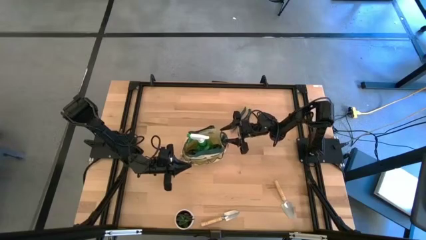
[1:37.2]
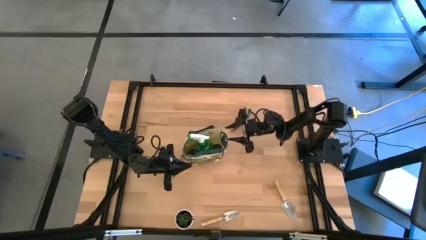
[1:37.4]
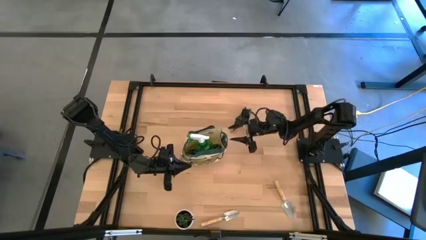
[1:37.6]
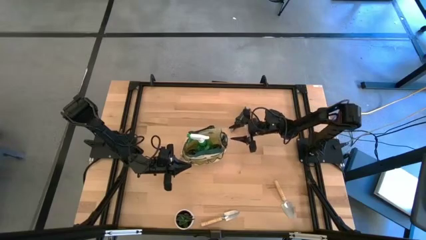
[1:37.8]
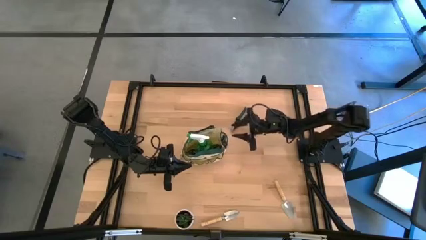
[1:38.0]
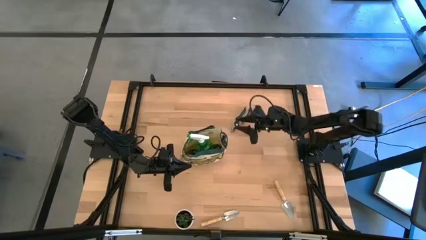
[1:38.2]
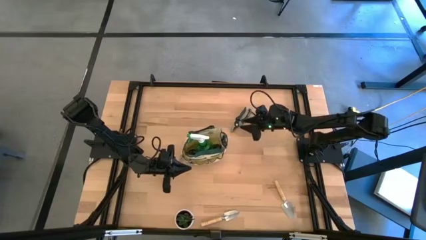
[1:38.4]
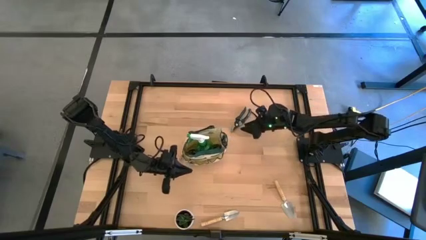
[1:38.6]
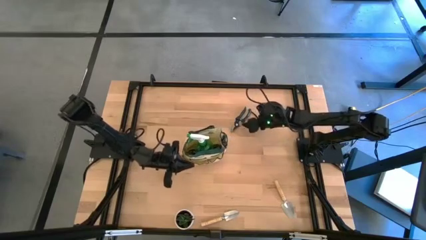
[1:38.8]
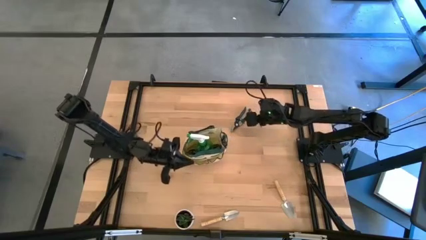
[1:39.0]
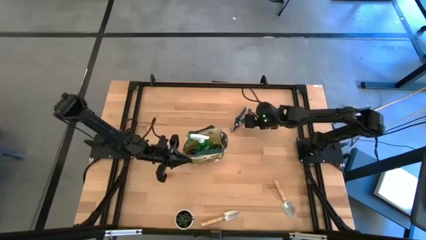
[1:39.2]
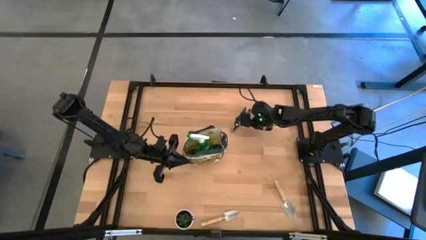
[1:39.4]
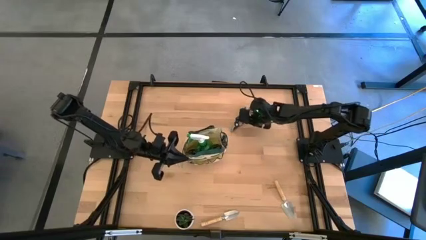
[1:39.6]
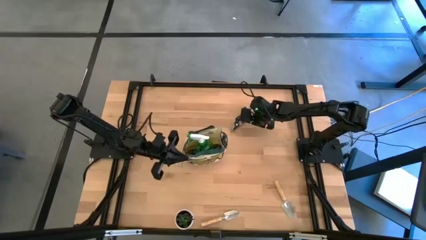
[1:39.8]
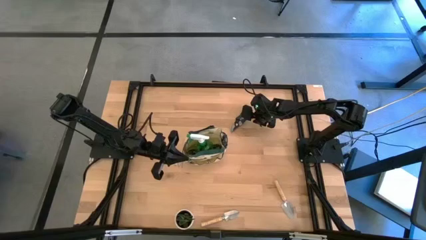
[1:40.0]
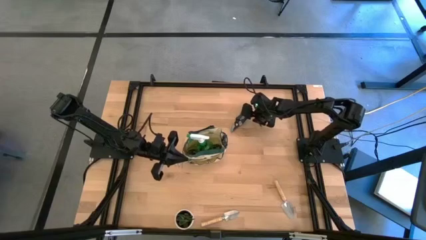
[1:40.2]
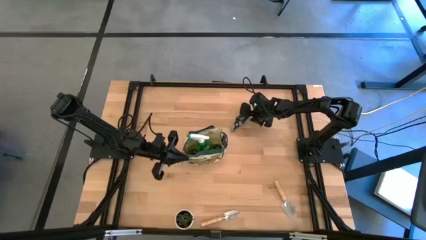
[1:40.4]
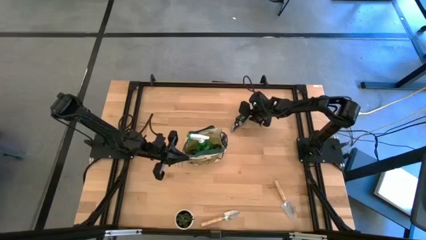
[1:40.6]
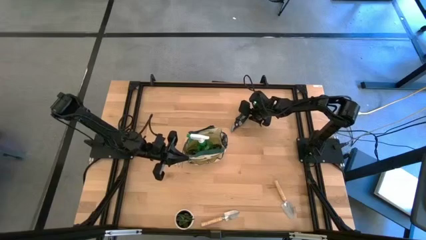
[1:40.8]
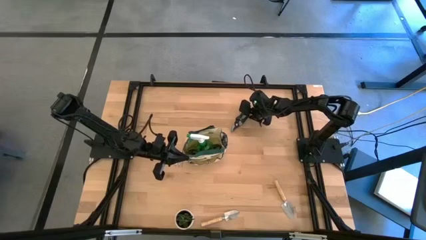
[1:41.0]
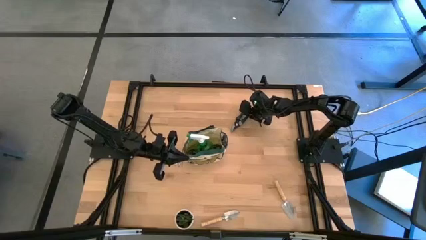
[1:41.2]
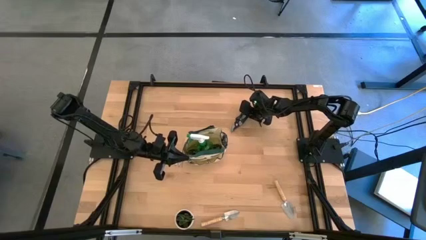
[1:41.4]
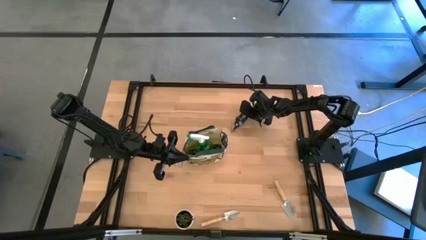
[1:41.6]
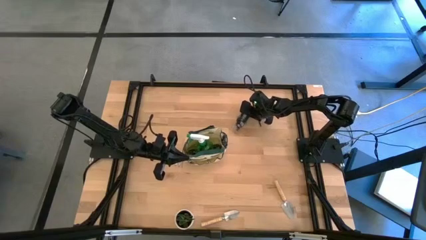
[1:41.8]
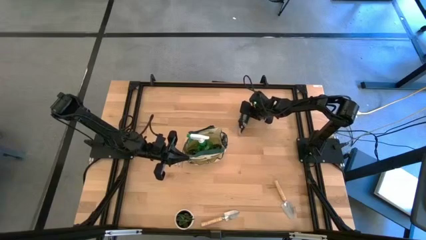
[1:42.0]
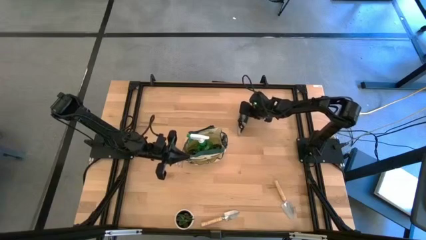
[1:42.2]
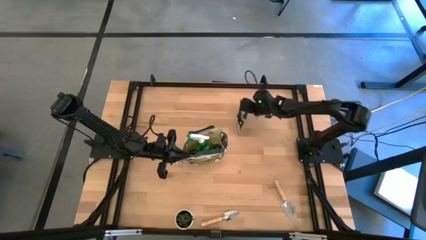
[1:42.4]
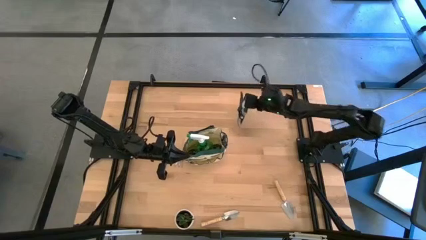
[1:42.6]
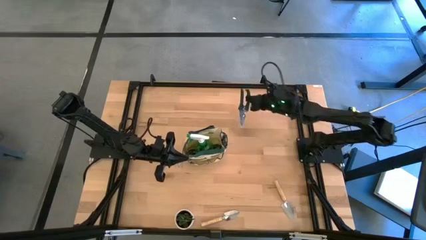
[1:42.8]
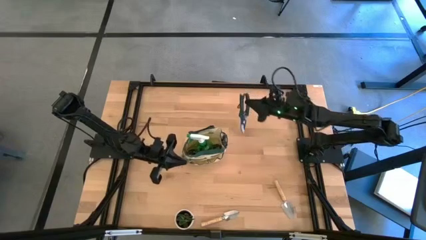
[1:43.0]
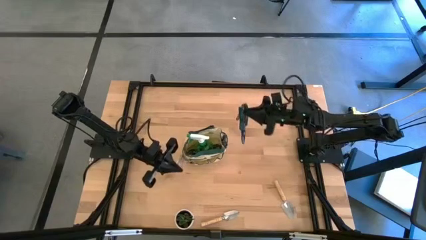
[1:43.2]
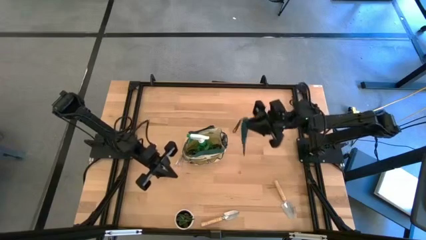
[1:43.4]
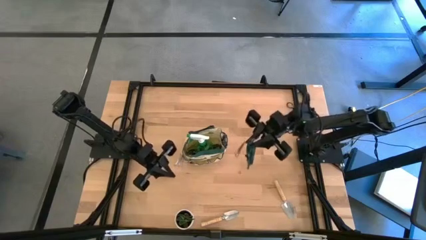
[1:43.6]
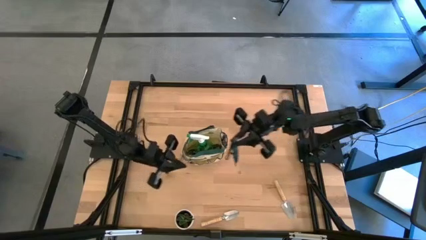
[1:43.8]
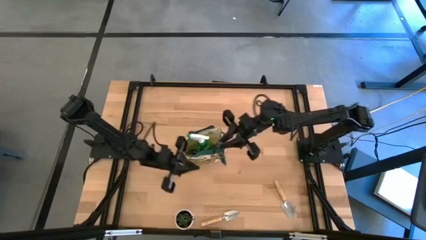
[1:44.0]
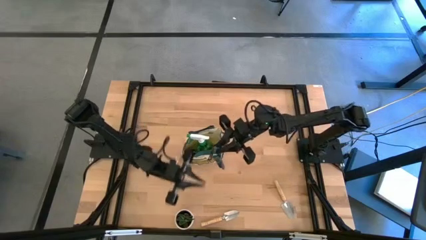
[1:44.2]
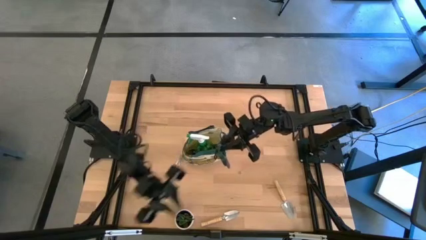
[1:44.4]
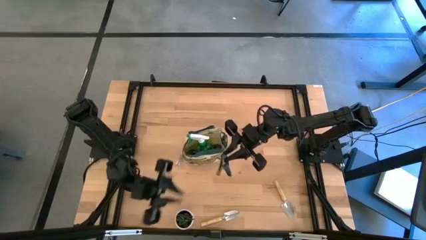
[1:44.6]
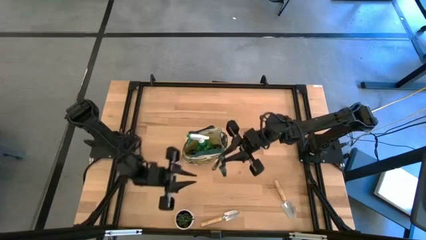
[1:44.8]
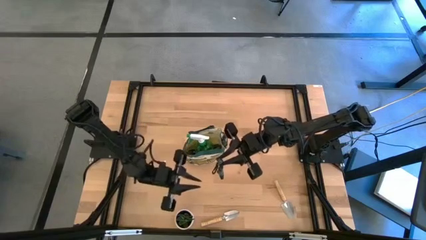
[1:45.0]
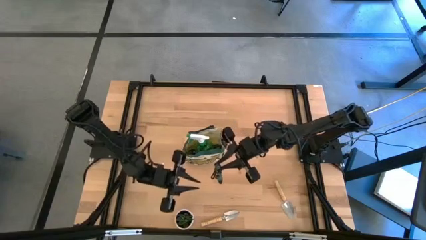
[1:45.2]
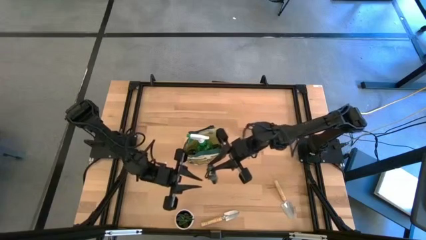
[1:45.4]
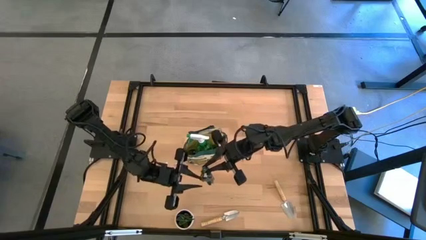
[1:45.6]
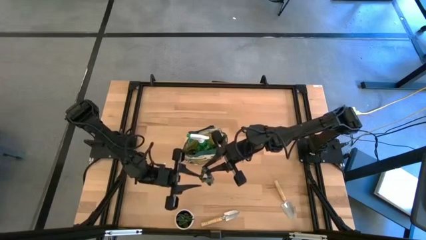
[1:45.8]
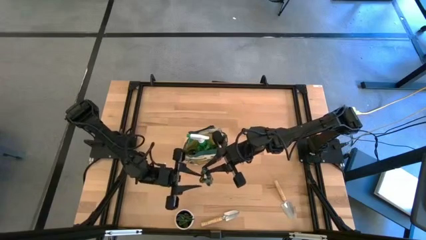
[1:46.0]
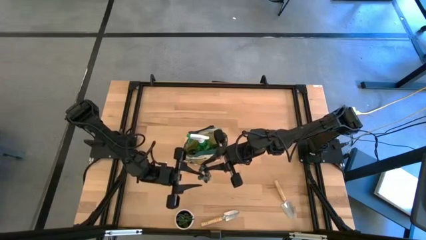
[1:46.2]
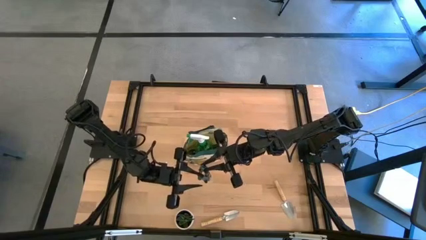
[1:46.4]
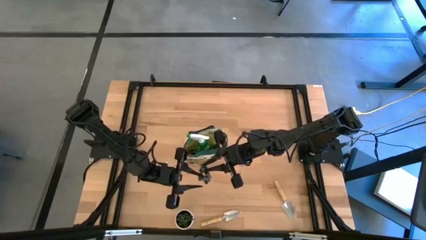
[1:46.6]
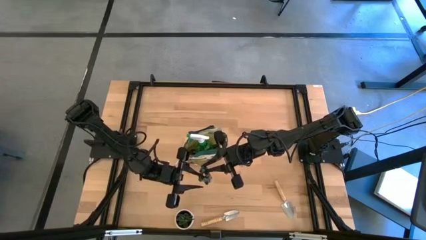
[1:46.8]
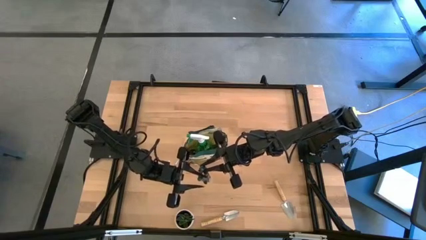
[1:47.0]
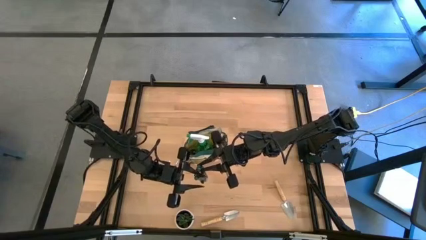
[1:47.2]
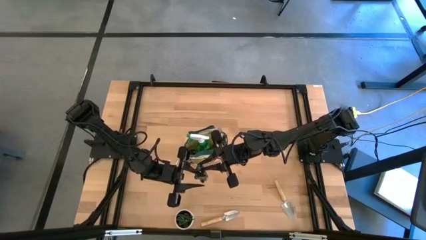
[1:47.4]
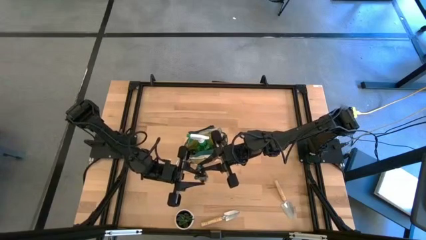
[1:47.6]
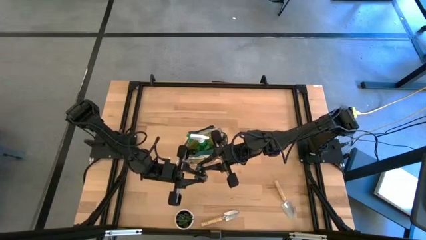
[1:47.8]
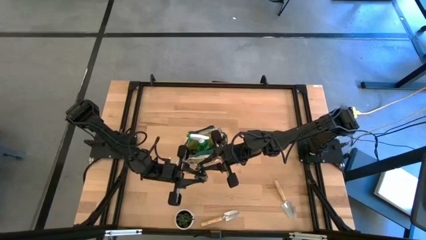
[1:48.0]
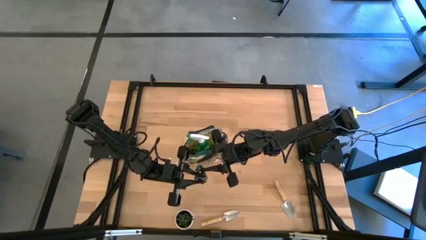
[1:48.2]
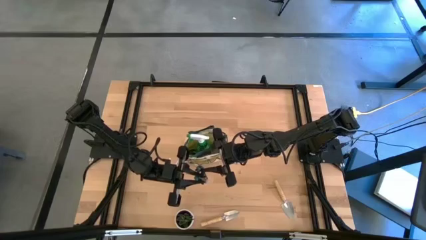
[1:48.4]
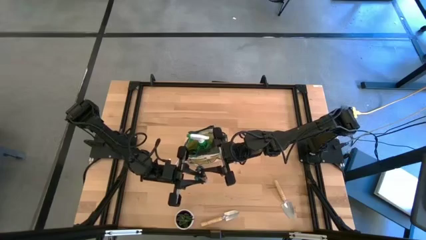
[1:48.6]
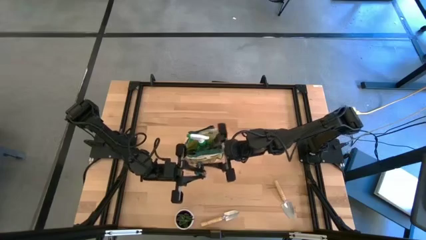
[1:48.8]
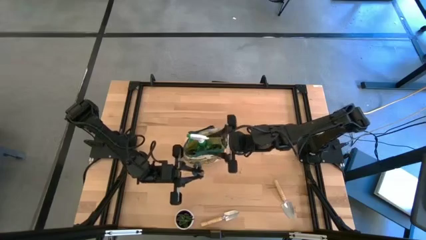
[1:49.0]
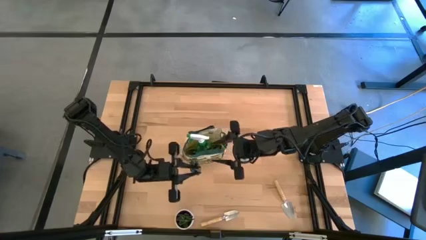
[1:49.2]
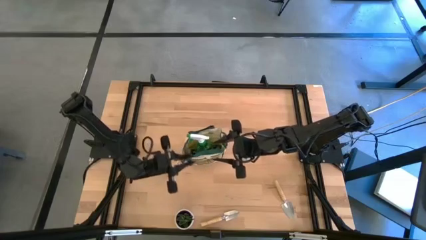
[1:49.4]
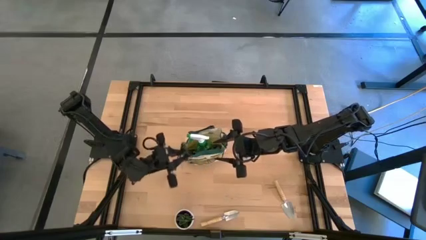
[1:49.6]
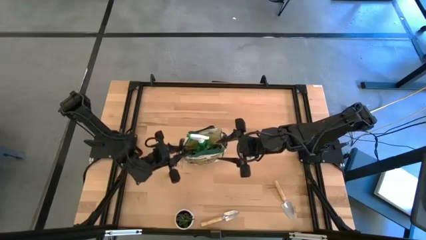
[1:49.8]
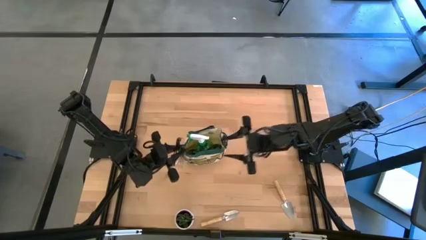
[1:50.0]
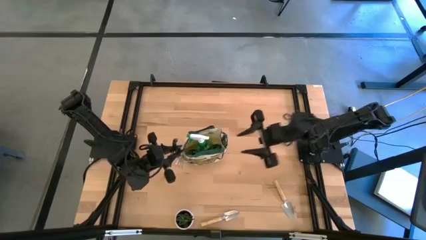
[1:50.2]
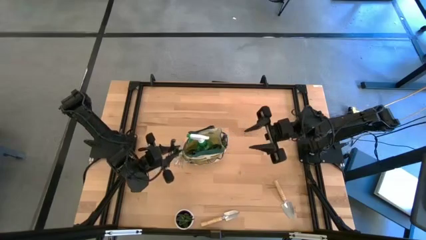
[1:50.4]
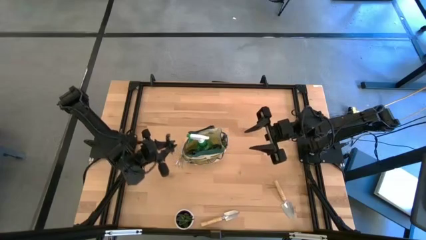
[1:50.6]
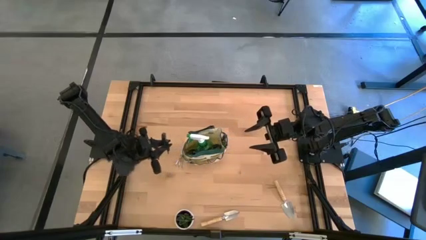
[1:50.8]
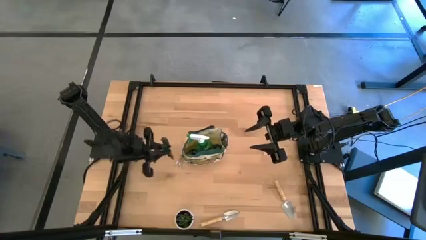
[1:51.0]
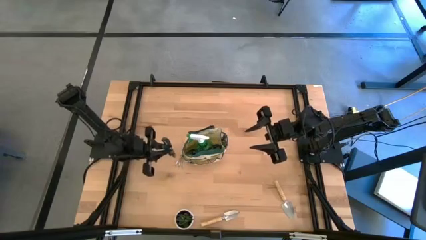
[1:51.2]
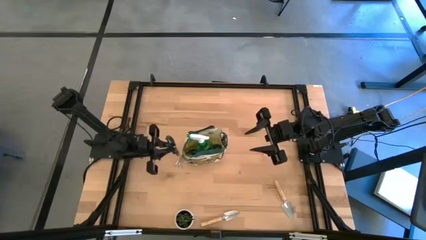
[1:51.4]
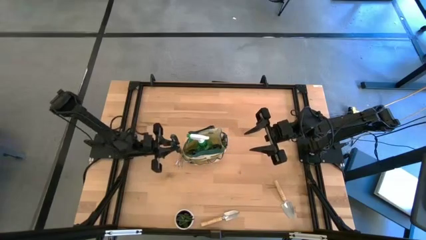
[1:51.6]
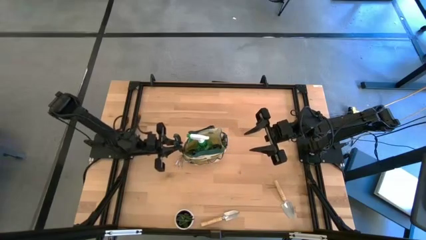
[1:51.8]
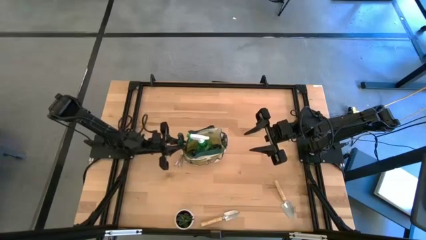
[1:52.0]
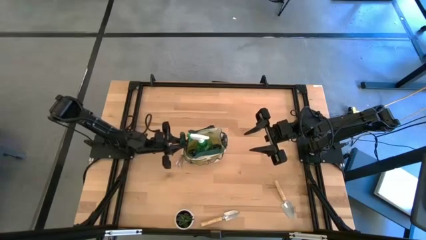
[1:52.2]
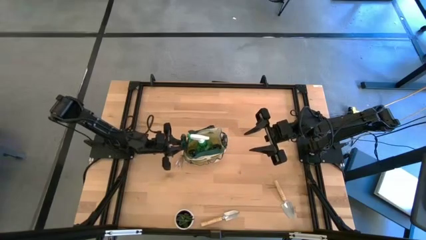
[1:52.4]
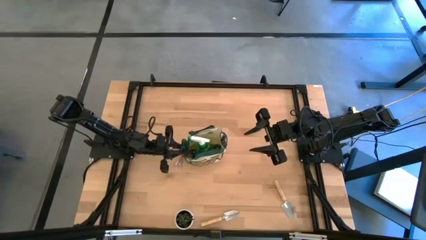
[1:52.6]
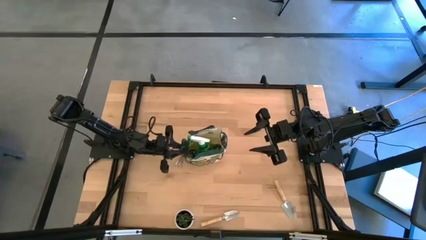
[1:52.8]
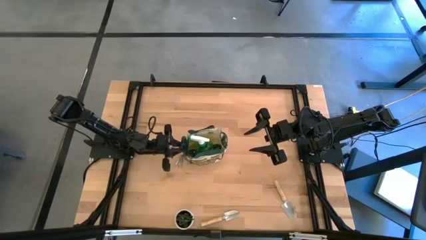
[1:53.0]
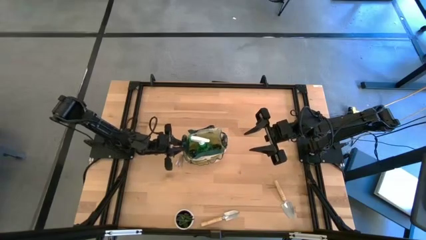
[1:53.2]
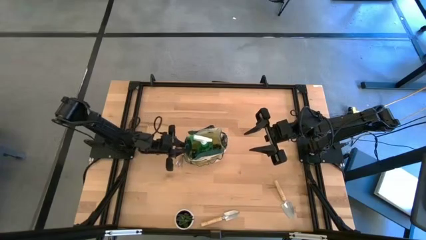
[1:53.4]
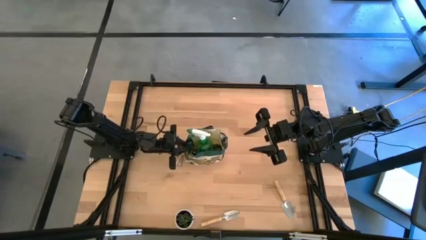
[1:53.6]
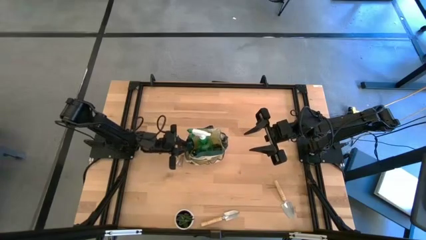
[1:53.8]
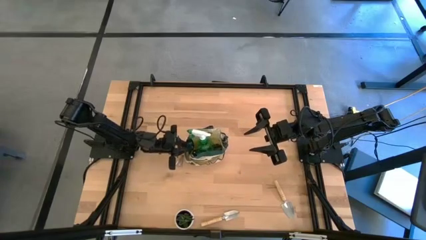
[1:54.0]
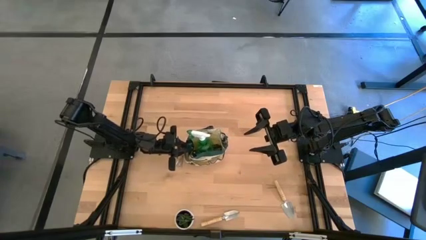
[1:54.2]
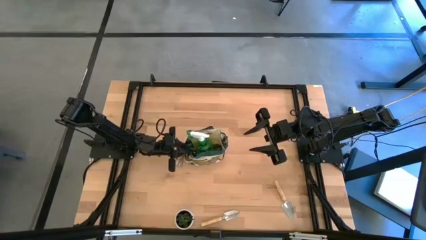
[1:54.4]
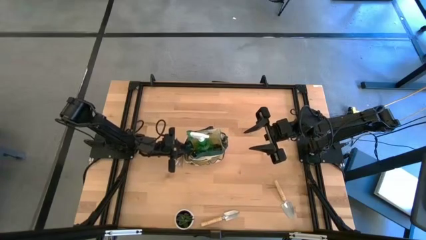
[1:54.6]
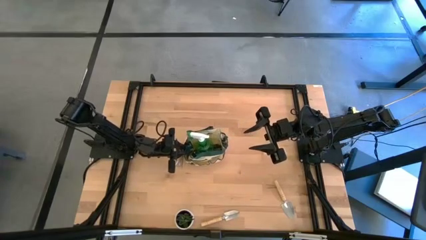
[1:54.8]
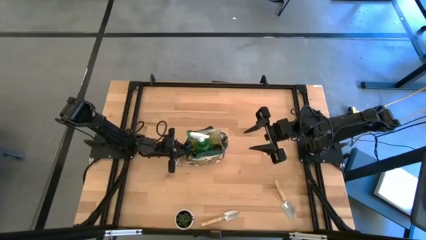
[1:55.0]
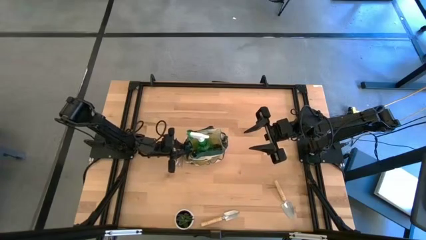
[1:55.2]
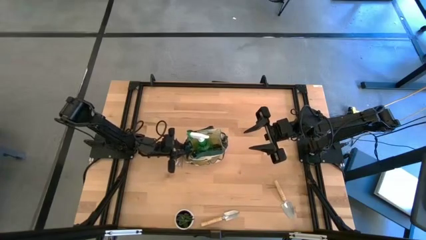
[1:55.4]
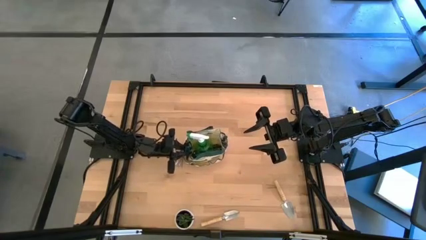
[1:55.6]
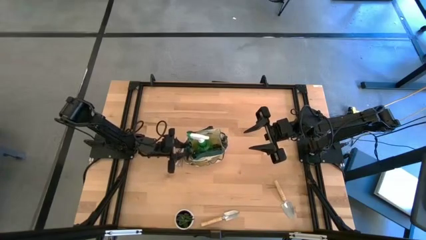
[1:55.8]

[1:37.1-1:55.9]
Task: Pick & Place Garden tools in Gardening bag
Put the shear scissors into the side pocket of the green gardening bag
